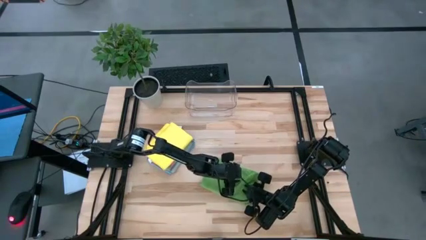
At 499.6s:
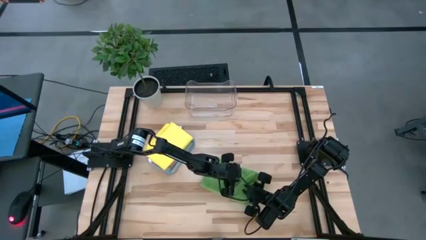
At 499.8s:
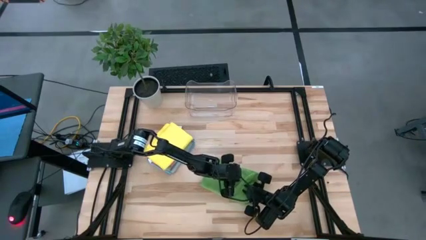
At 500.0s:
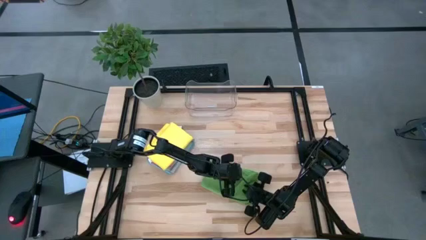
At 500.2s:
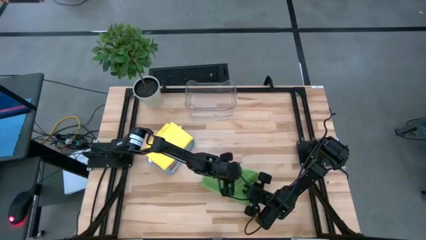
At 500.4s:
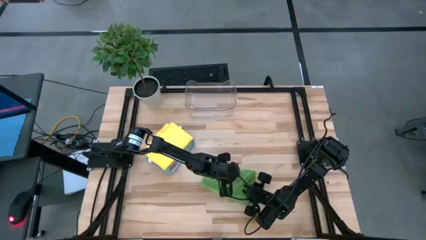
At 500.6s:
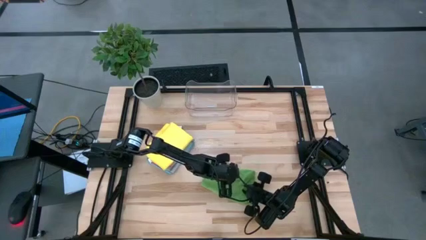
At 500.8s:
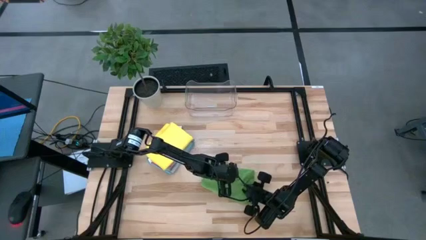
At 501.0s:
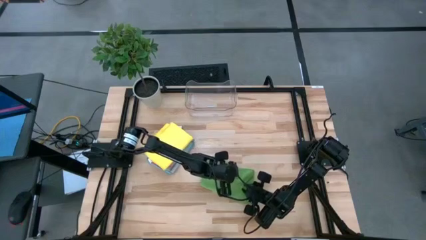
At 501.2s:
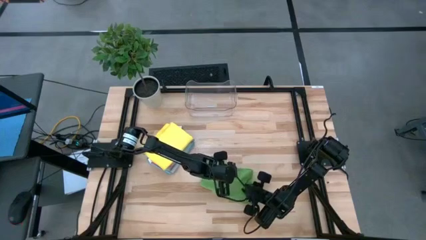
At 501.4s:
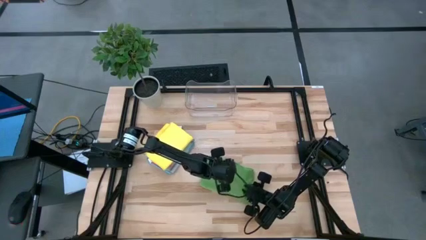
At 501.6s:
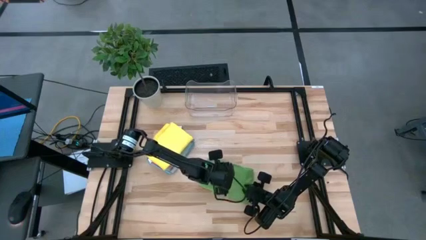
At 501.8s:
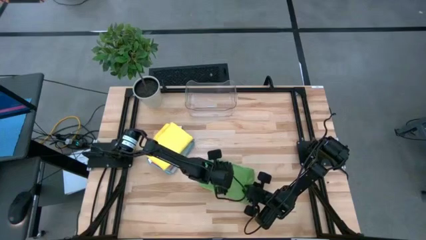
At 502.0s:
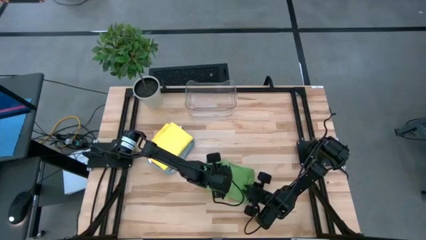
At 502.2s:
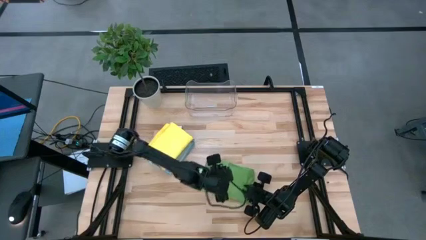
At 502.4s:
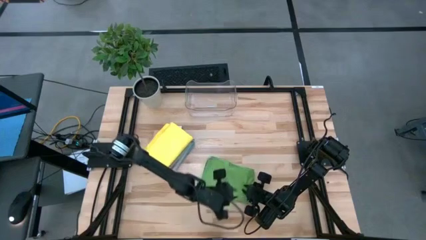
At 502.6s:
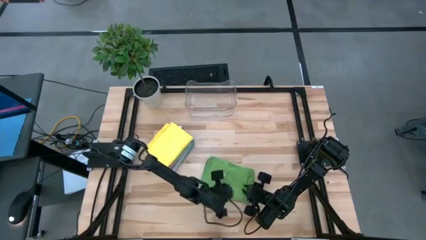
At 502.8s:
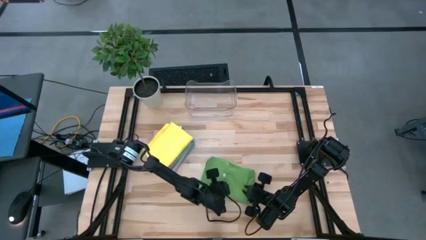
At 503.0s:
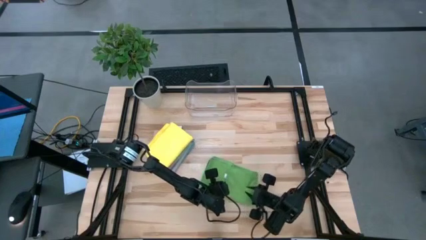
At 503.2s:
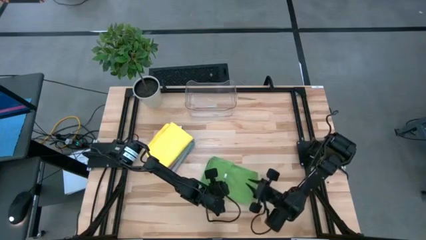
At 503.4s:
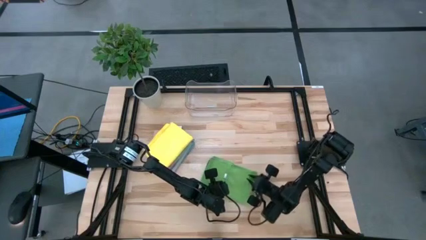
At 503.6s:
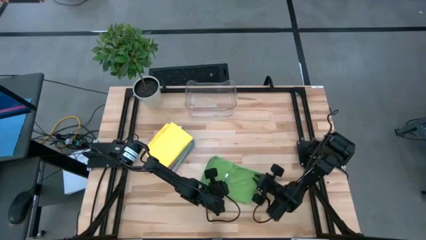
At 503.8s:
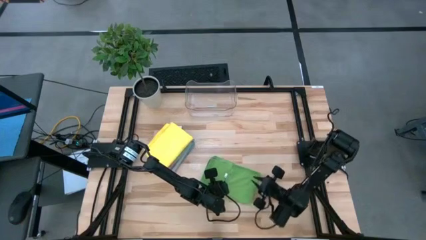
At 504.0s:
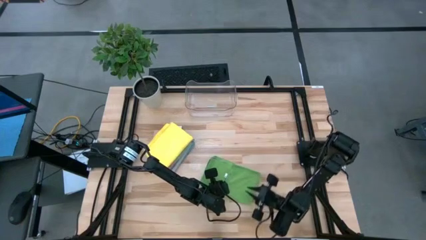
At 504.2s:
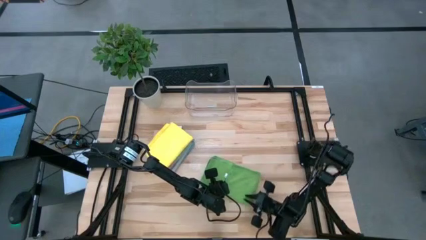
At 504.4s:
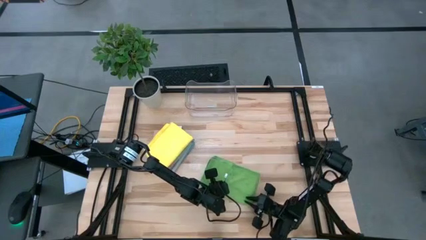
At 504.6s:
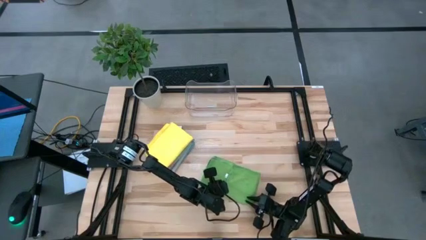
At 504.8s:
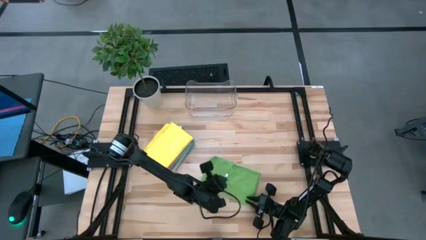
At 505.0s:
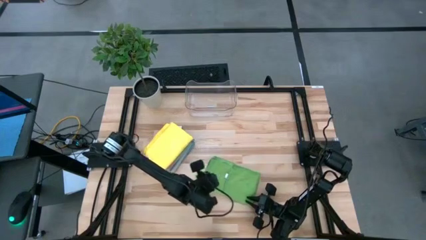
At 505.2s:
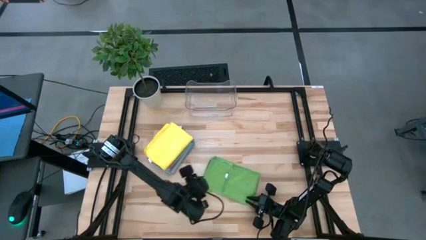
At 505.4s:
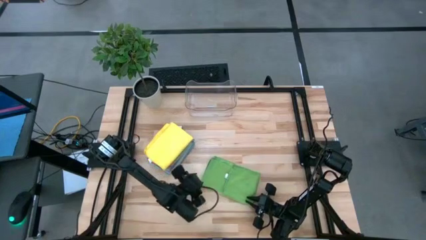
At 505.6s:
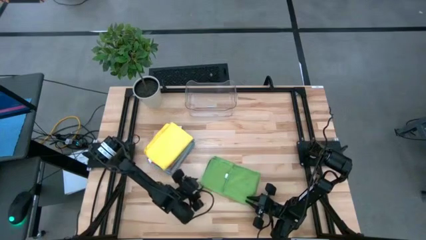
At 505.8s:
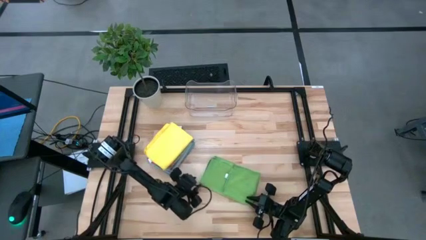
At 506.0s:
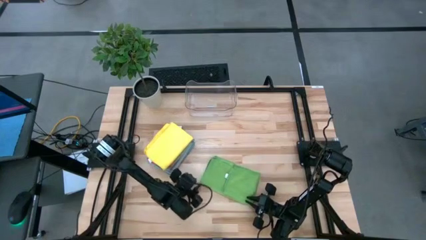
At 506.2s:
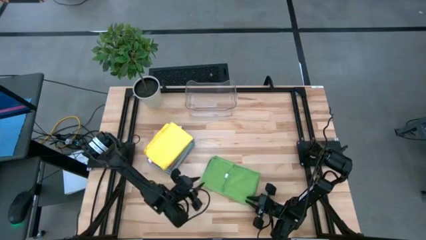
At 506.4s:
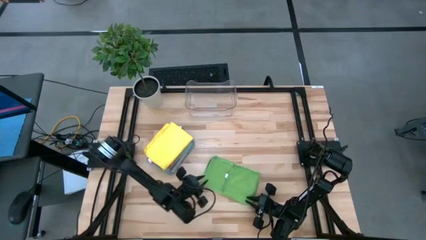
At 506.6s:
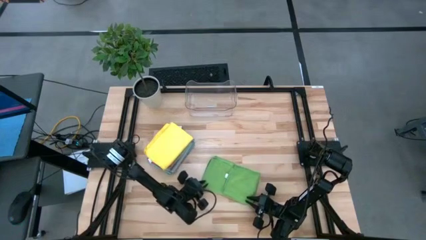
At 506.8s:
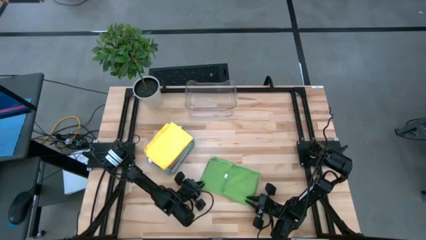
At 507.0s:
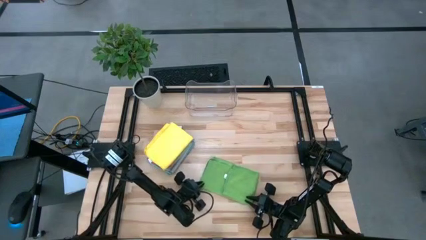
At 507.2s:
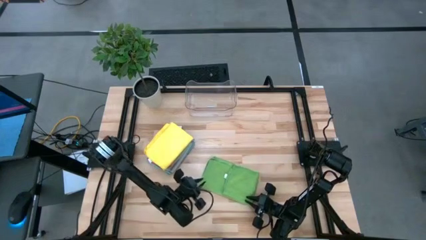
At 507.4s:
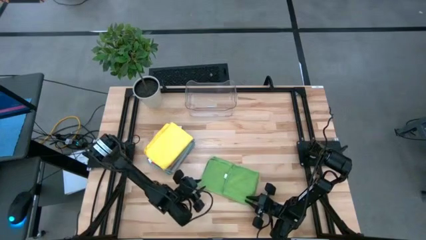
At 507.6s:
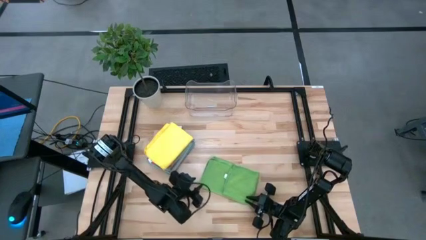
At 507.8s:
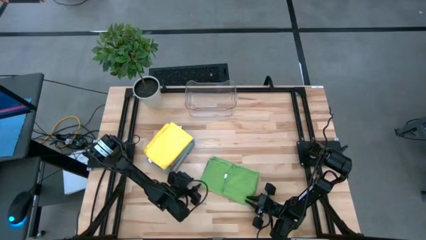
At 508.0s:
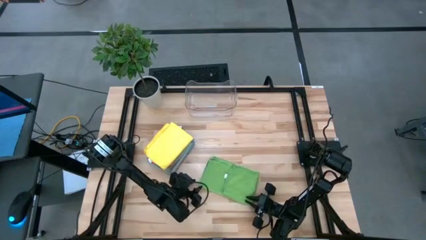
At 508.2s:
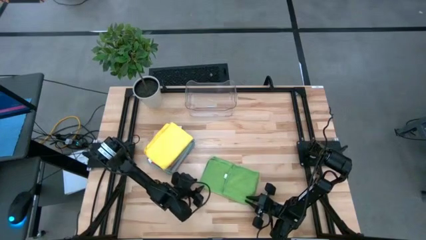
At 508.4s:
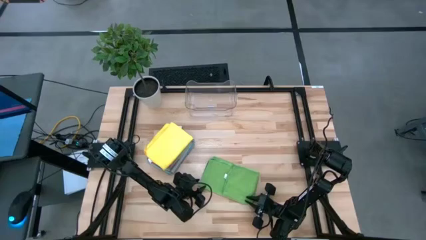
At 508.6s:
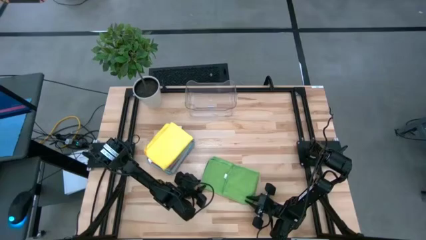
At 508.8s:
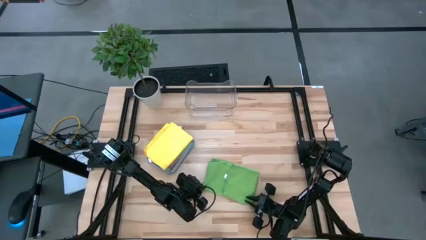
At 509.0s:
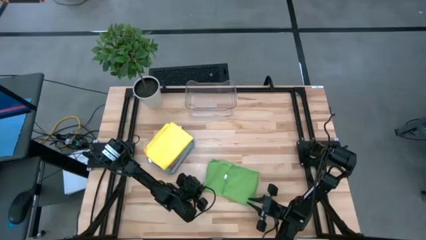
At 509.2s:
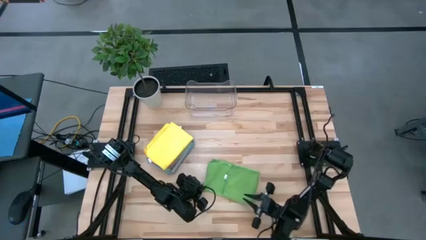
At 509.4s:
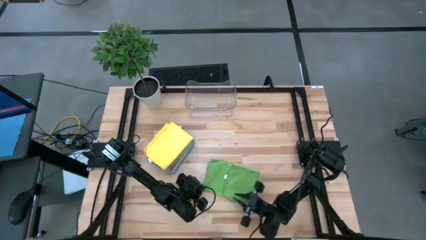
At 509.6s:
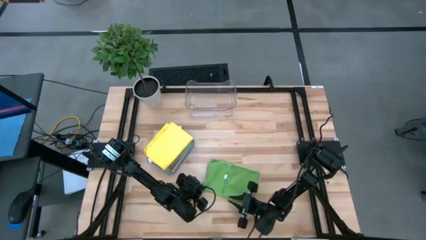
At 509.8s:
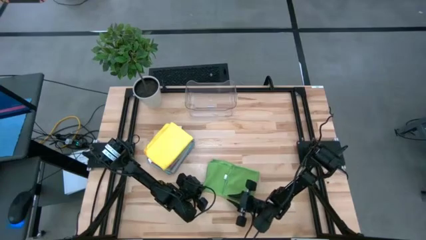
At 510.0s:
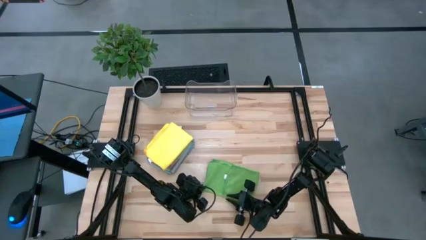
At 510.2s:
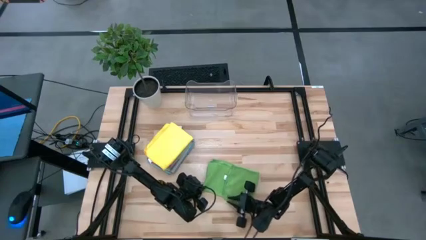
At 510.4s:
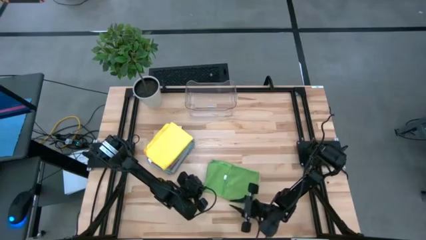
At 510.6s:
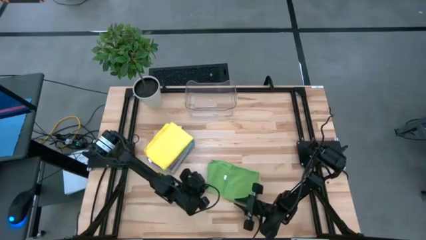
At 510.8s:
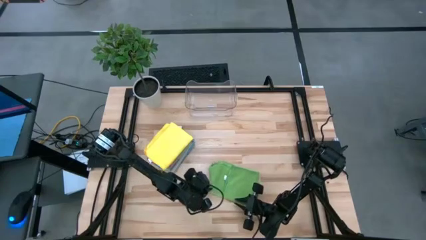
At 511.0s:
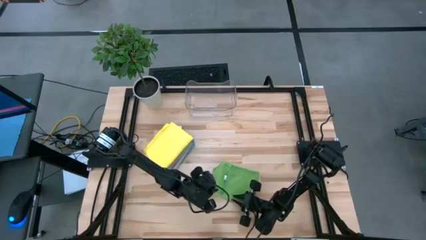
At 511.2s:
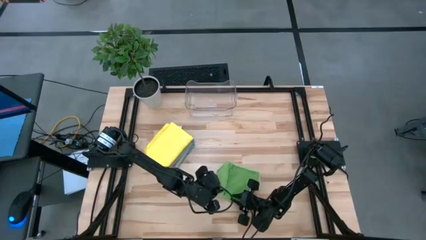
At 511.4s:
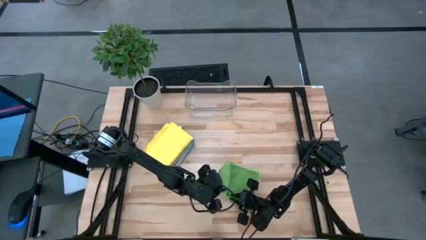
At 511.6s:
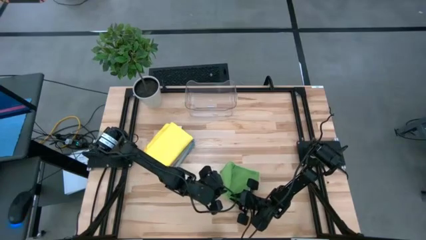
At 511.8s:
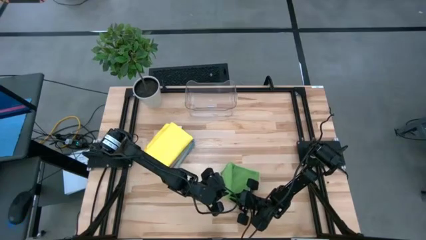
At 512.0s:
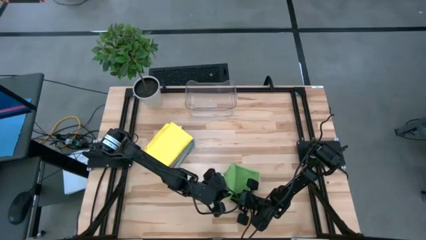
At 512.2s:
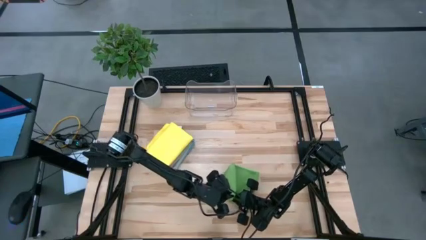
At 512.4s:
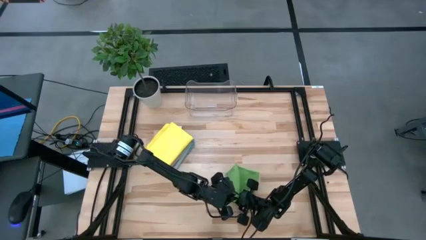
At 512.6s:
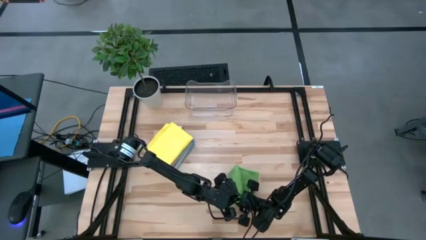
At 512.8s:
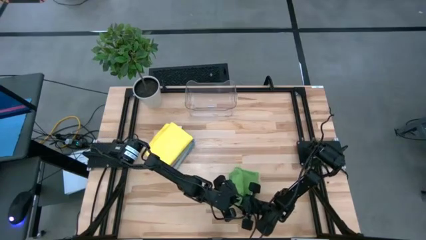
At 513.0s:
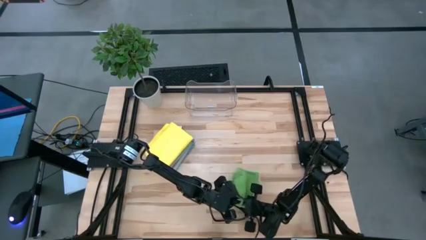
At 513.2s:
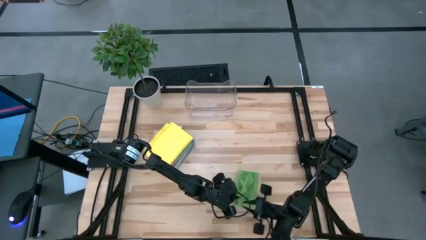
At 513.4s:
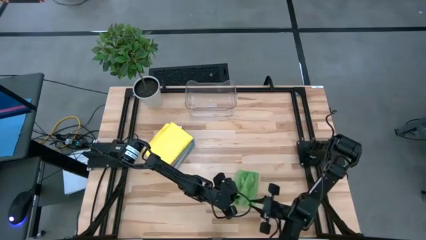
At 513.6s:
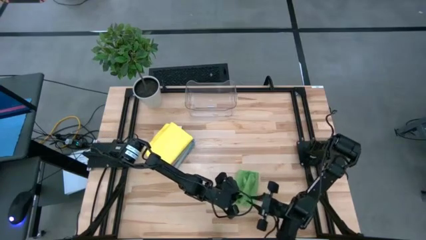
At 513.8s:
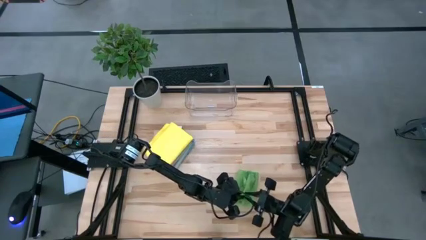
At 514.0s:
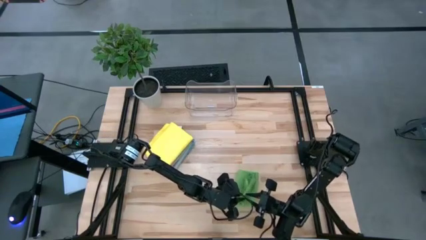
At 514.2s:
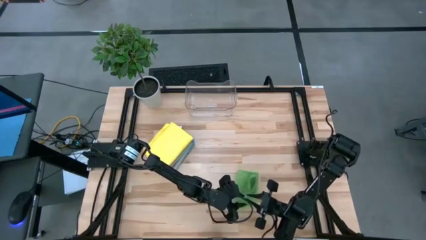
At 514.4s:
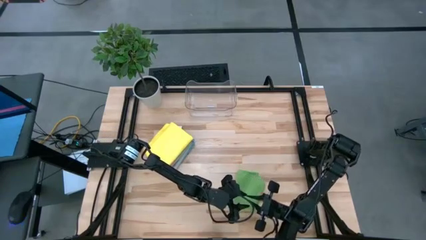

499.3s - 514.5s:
Task: Fold microfiber towels
Fold the green microfiber cloth
